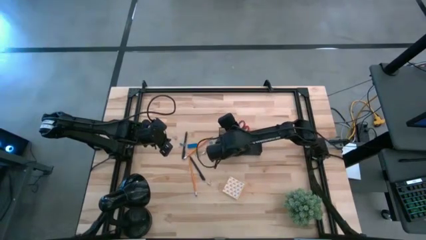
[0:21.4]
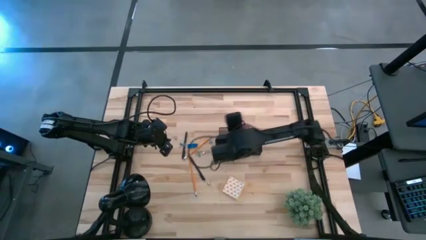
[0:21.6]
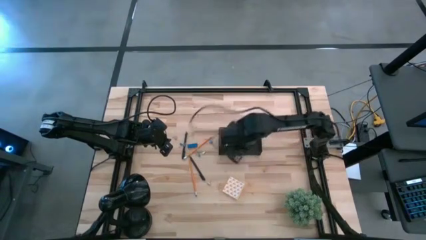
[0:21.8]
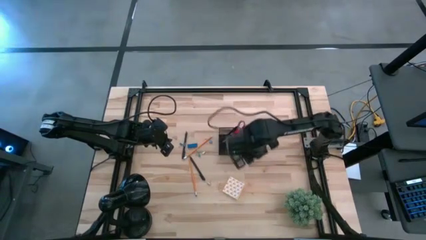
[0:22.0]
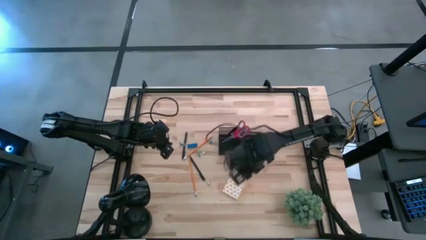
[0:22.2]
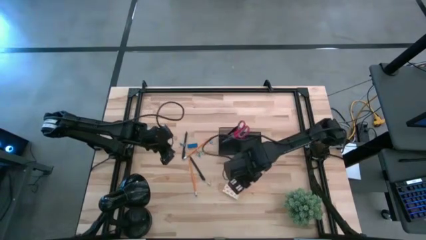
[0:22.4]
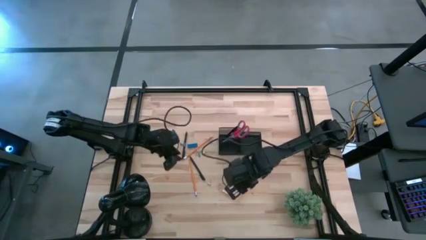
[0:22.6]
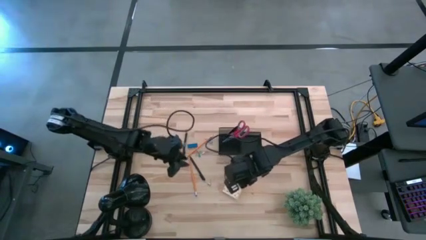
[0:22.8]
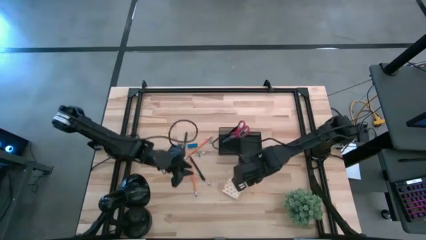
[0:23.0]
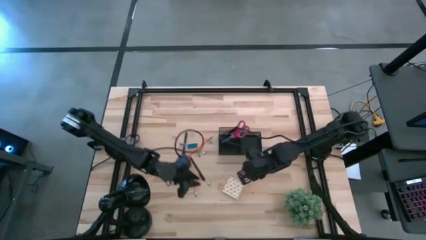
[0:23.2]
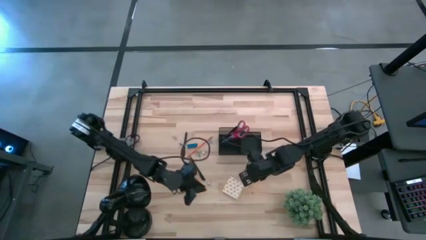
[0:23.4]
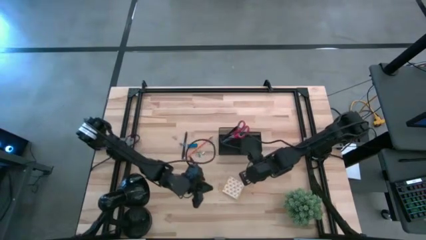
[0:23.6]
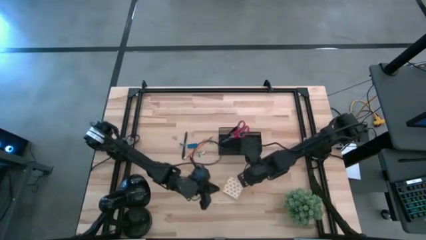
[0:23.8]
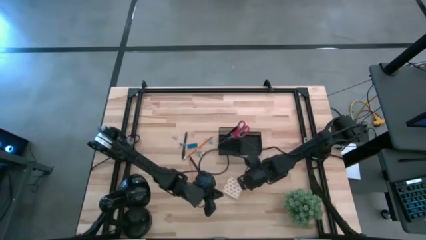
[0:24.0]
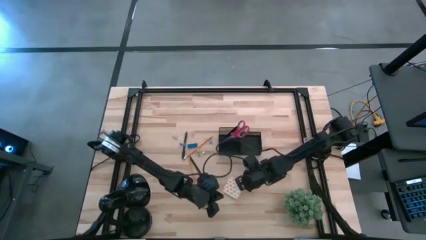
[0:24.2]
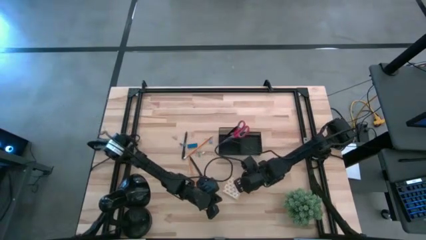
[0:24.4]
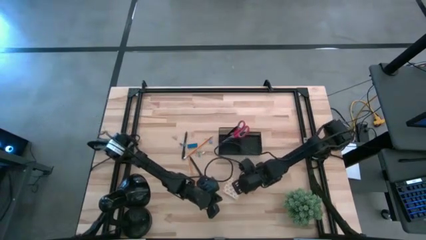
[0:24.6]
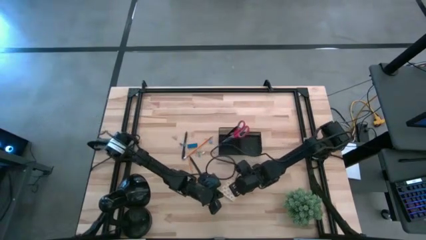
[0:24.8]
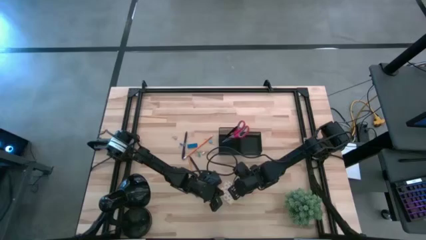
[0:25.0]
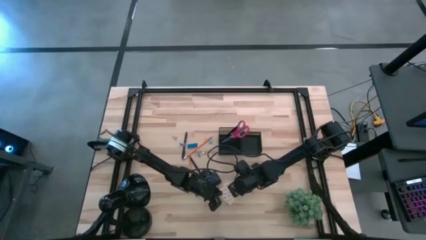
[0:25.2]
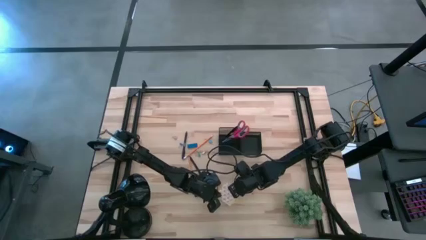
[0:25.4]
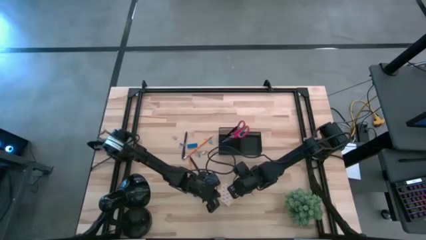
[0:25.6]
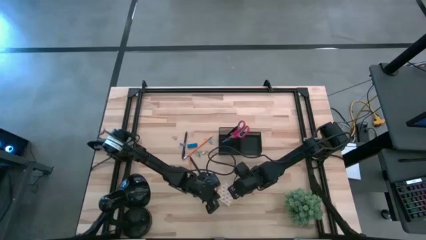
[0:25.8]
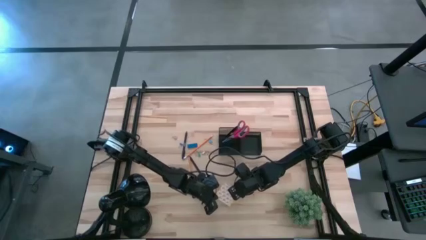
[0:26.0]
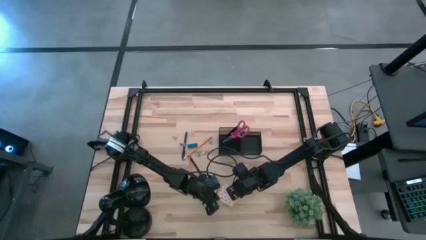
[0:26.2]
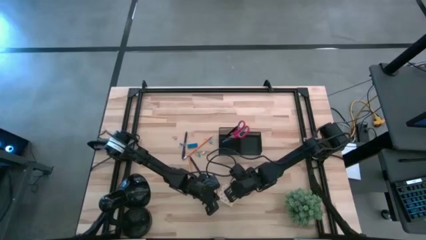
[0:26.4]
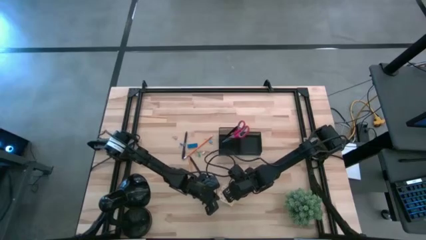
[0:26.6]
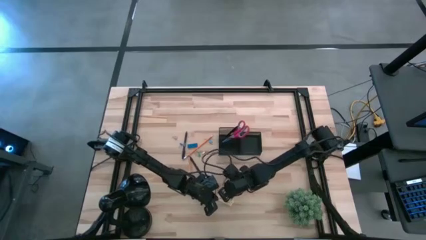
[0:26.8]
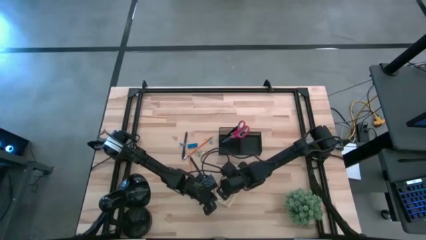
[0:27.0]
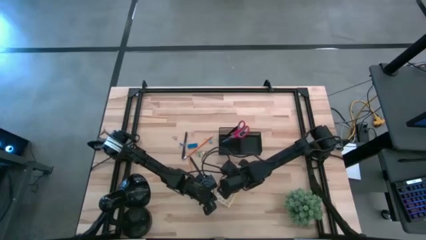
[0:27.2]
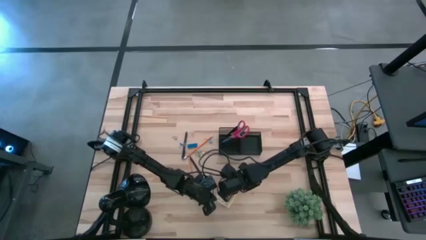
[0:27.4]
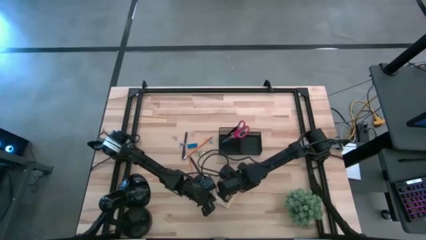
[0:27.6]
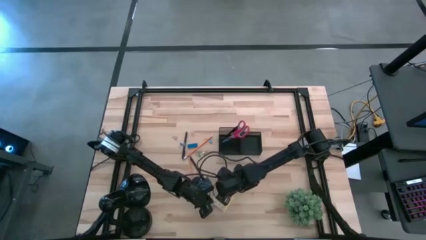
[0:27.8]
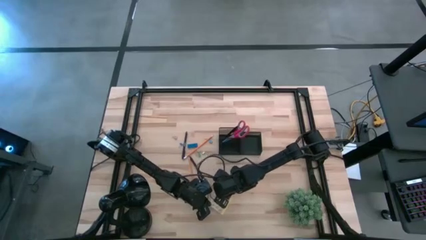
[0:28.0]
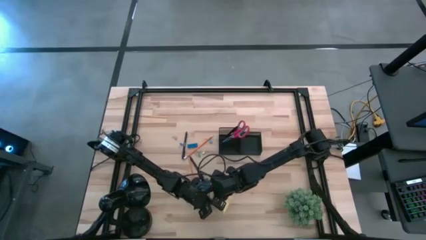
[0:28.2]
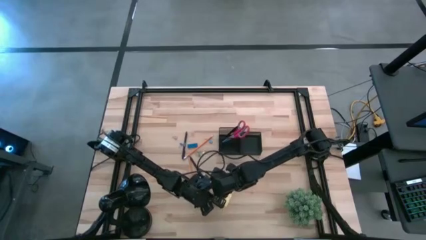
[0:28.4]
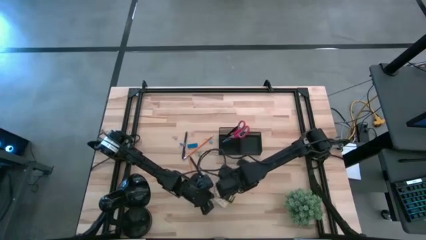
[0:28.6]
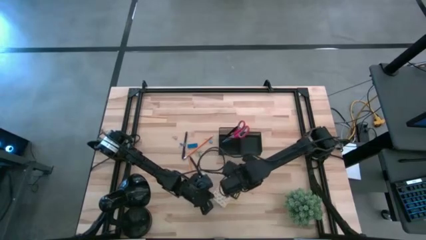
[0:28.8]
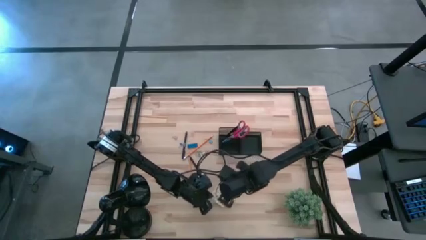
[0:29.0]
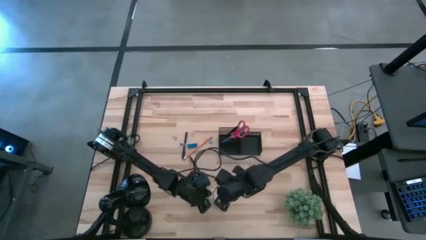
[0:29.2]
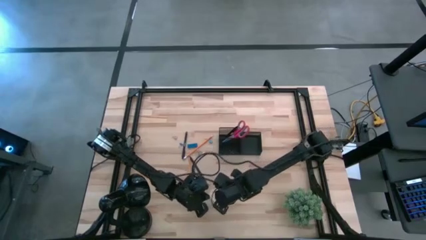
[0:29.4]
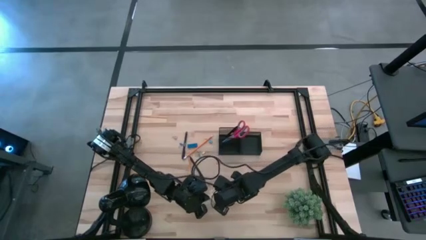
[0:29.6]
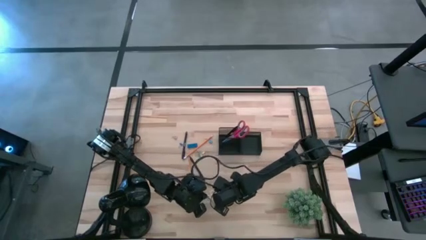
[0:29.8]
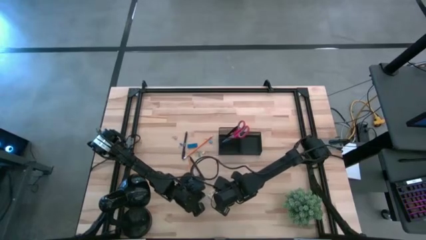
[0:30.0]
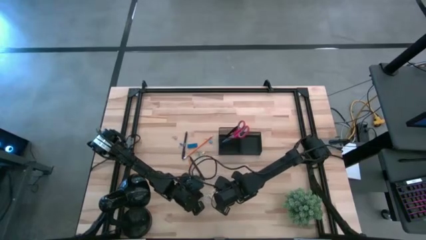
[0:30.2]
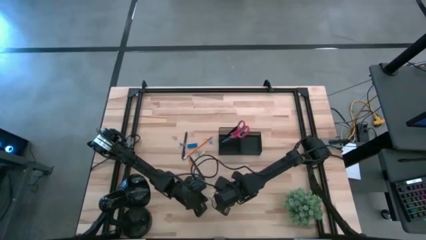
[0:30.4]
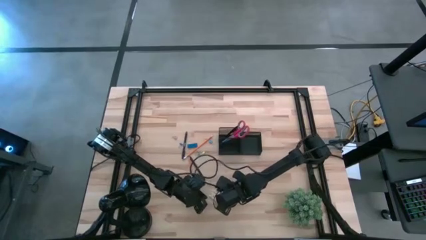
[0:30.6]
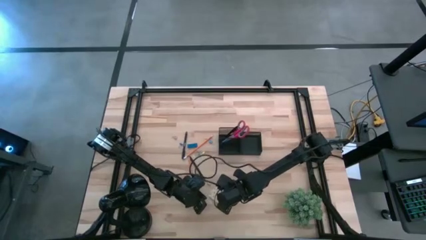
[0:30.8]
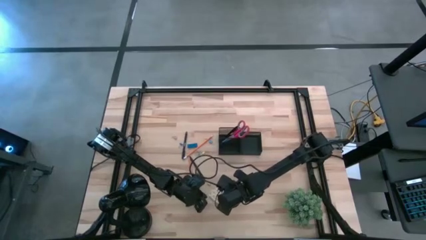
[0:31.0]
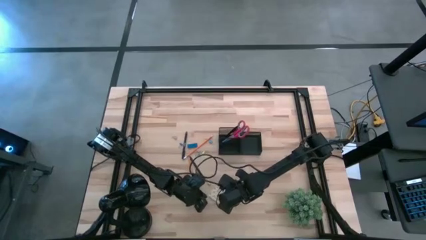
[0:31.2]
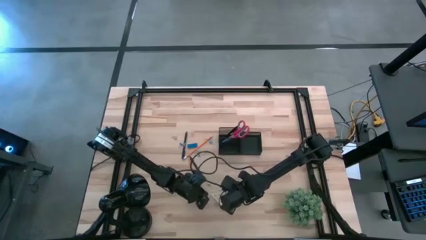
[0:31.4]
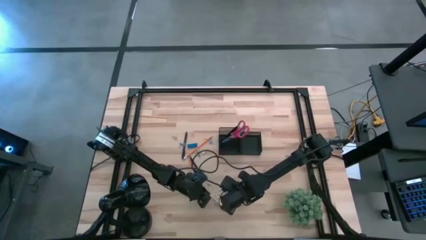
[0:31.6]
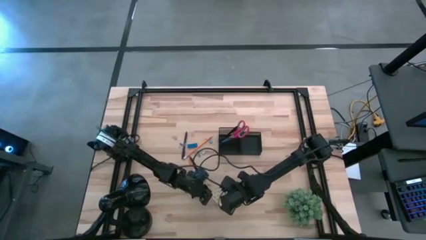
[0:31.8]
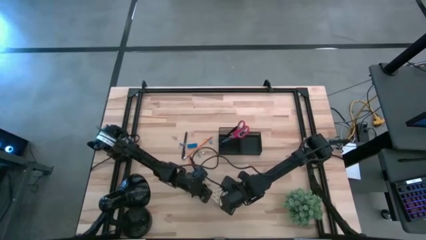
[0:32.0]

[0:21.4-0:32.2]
Task: Pick and place office supplies into organizer
Put the sticky note into the desk organizer
